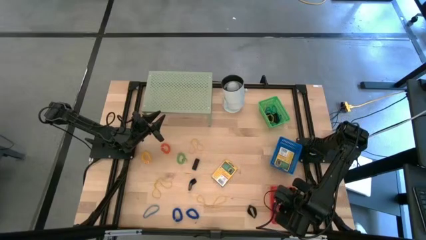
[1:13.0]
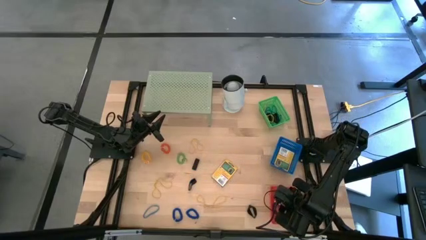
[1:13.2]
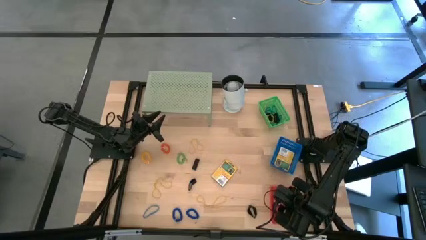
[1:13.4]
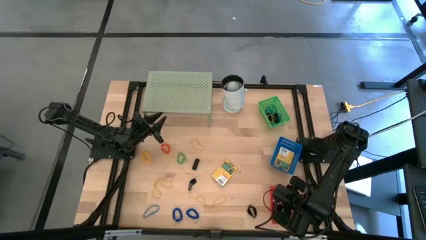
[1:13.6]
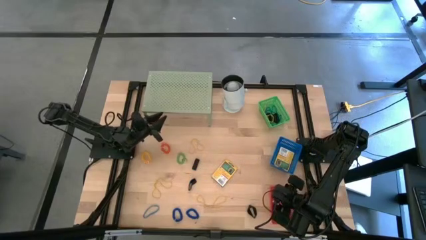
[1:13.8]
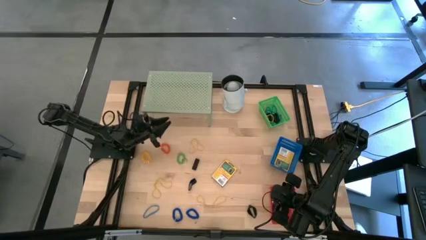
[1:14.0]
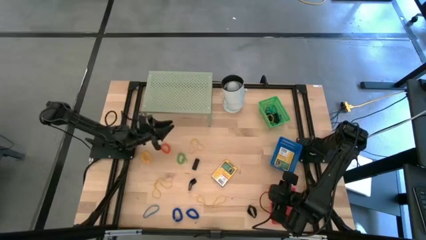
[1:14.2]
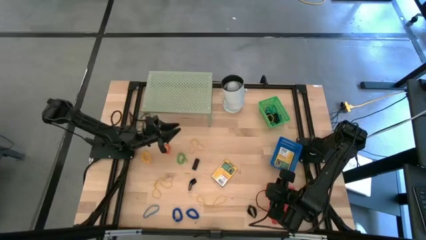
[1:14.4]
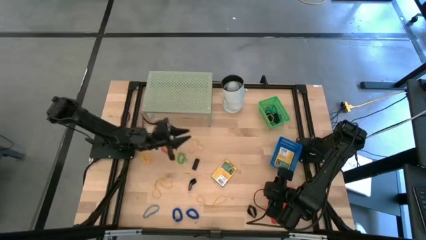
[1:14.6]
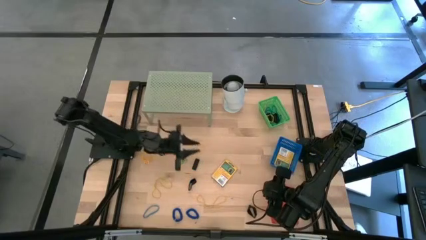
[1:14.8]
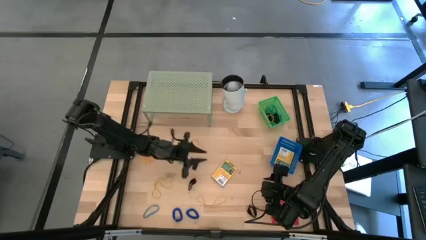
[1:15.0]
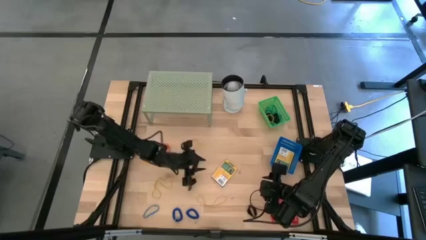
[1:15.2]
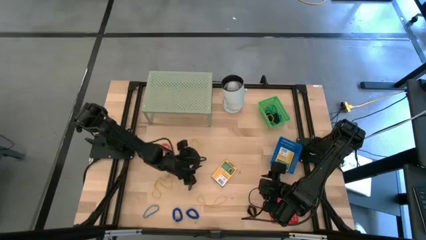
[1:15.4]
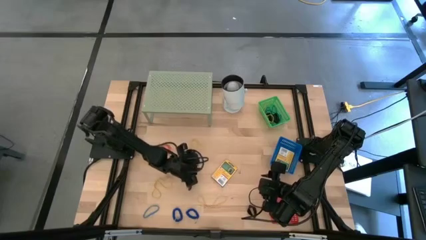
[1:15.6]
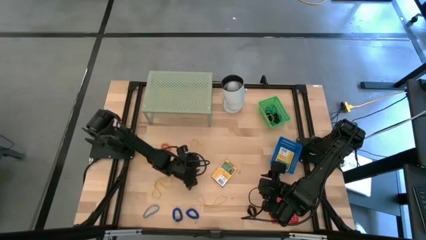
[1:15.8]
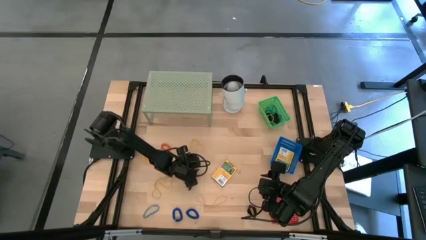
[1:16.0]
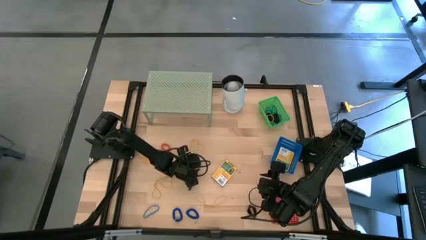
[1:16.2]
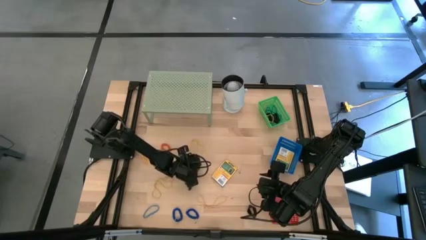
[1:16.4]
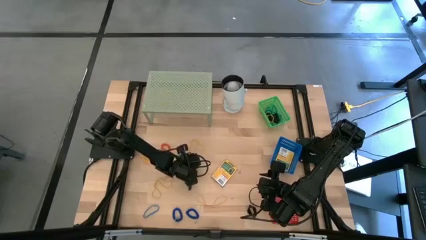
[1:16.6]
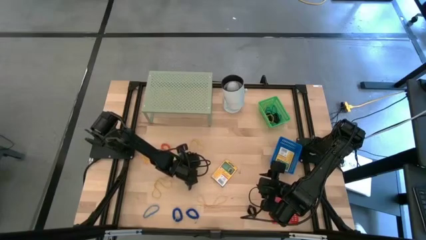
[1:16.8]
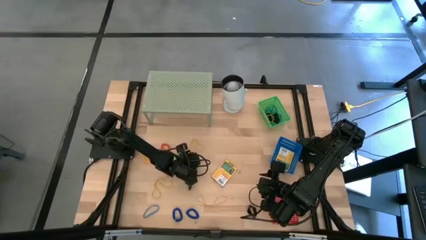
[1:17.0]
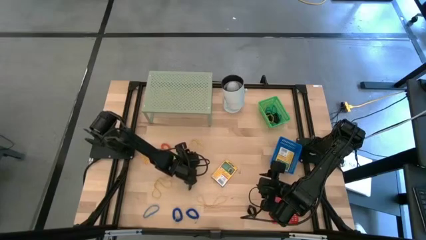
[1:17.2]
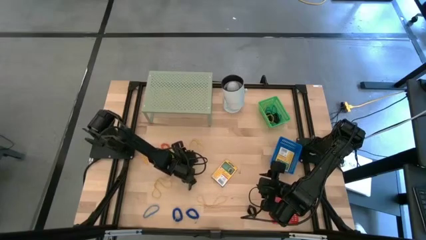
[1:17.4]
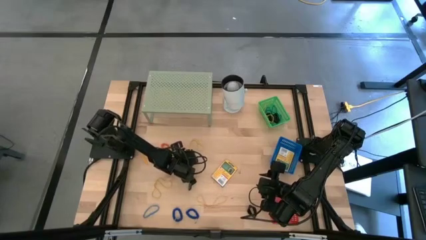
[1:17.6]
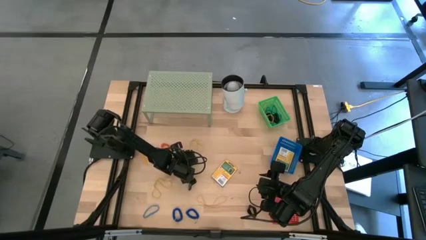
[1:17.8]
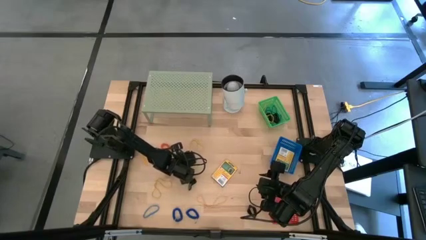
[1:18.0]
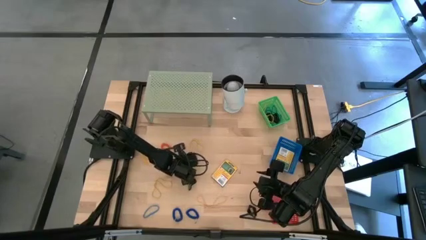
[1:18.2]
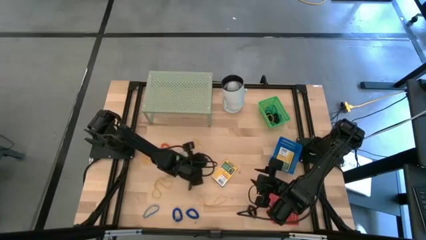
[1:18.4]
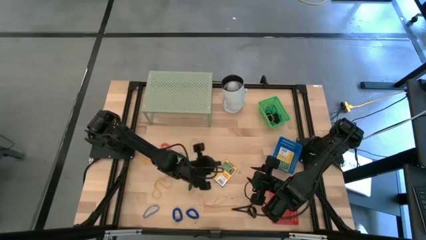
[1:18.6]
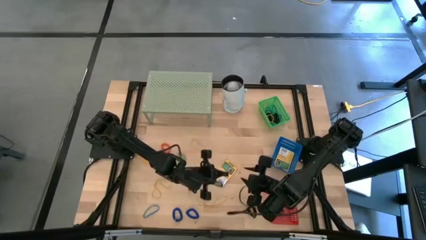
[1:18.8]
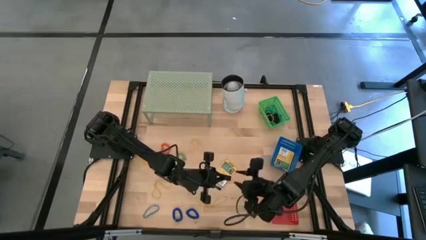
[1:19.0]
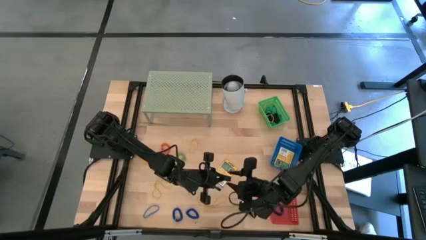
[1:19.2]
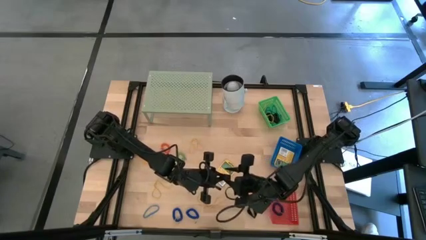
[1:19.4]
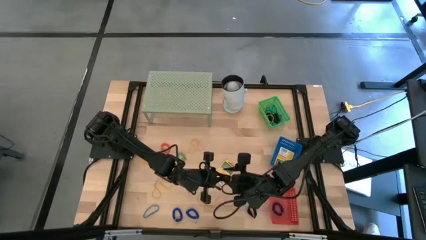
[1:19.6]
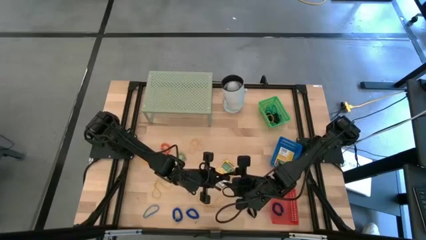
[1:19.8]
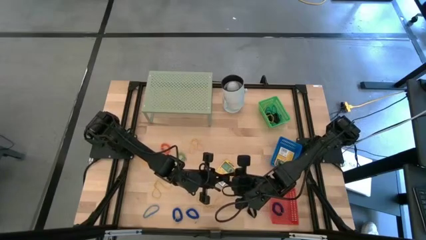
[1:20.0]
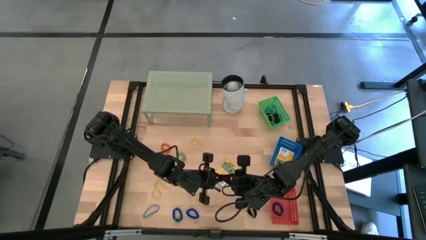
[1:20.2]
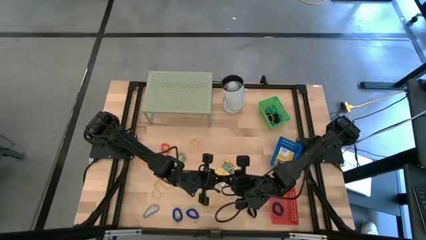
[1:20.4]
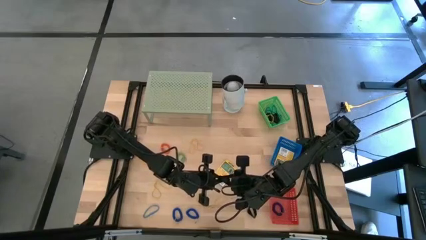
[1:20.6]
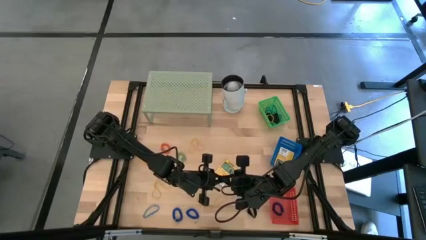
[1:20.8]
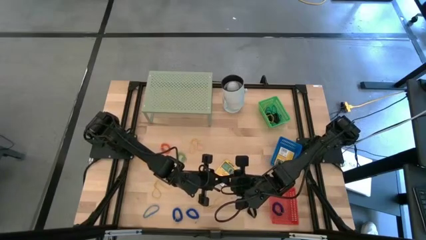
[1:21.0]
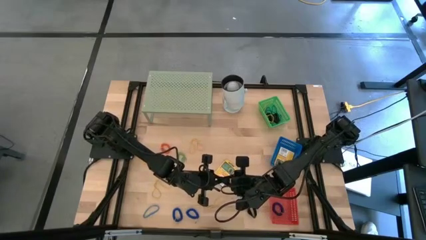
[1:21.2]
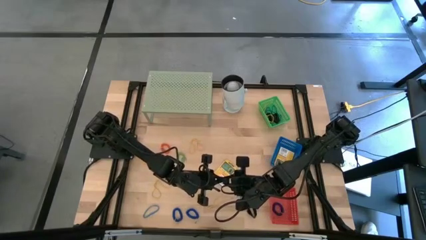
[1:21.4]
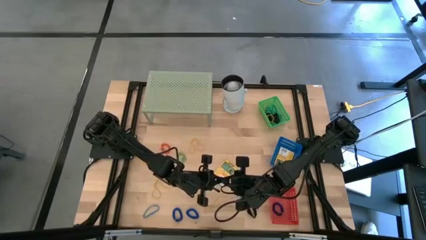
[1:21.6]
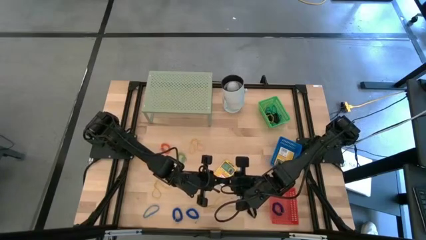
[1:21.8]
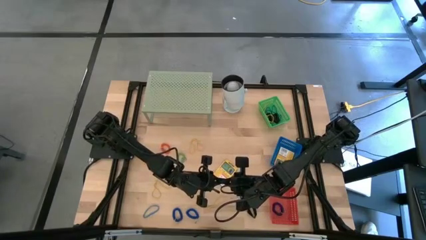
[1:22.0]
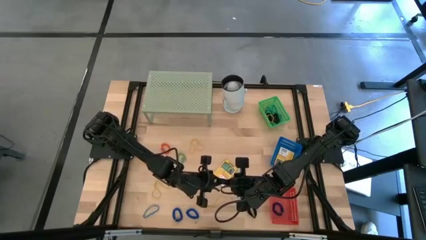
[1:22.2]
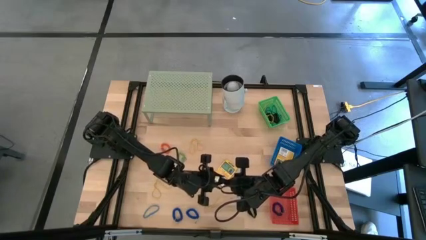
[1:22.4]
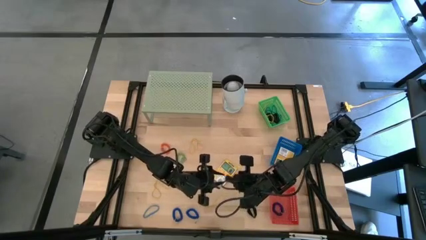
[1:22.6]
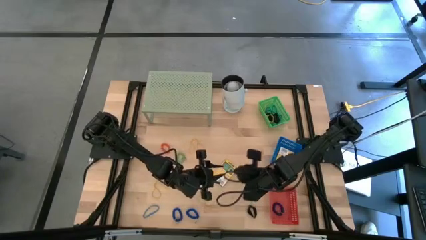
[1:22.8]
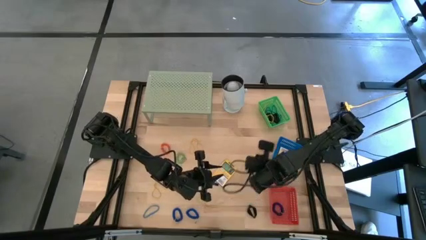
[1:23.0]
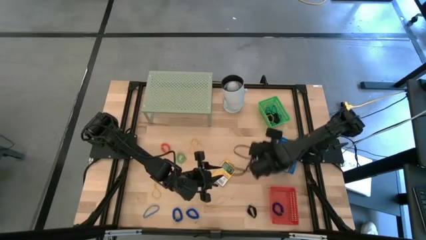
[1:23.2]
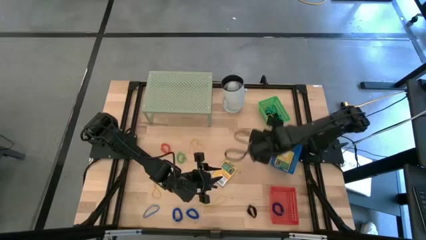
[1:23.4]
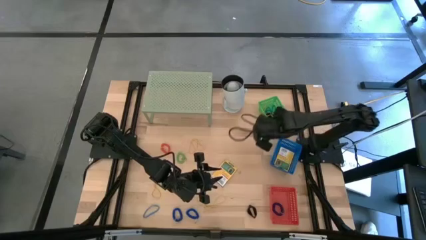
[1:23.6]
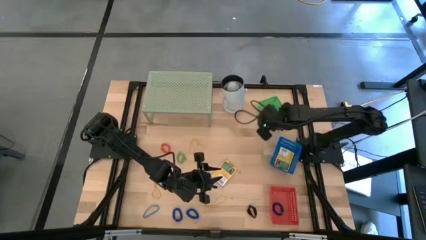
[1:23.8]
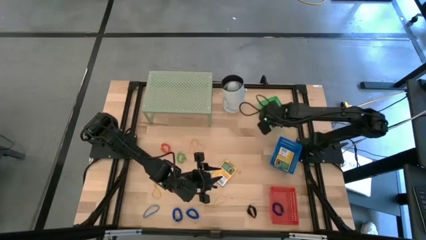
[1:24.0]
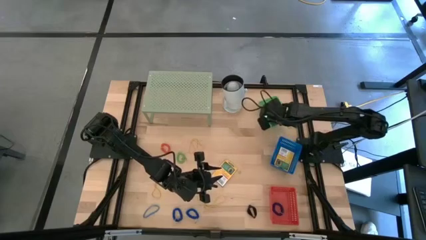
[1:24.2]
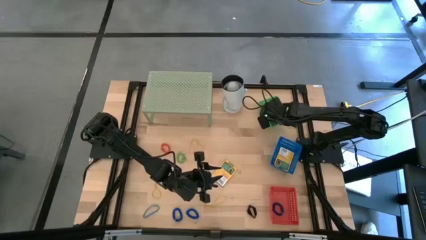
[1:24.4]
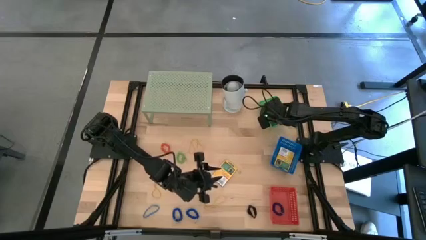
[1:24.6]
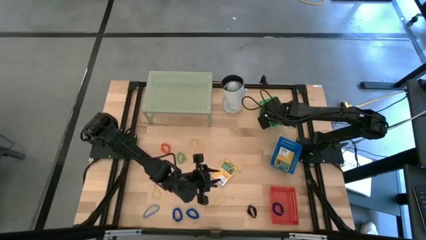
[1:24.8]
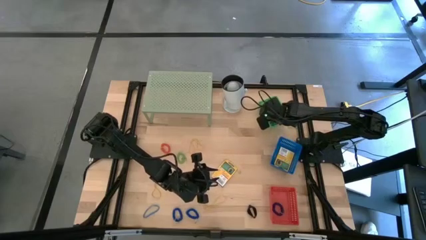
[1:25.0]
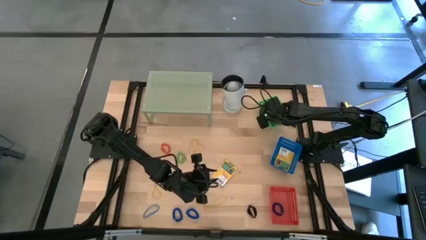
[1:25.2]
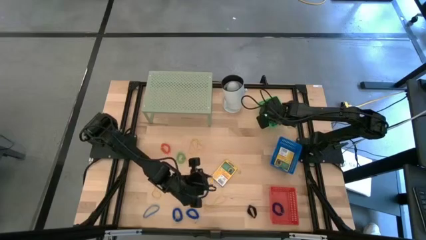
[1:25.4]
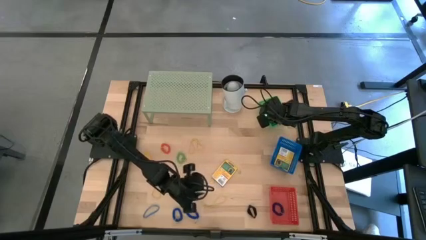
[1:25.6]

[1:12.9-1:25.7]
Task: Pick & Place Office Desk Supplies
Put the black rubber band into the green bin

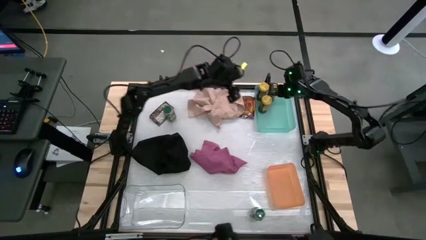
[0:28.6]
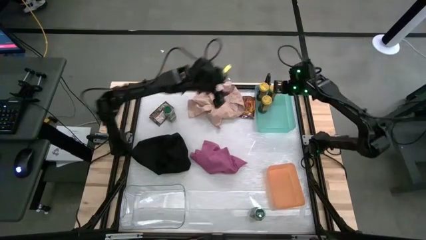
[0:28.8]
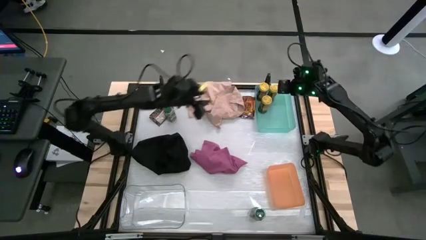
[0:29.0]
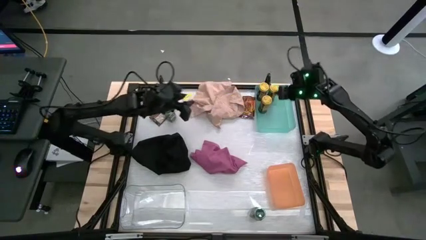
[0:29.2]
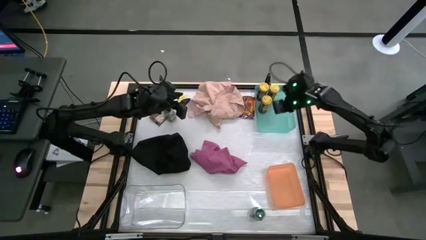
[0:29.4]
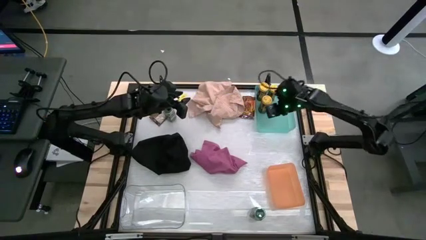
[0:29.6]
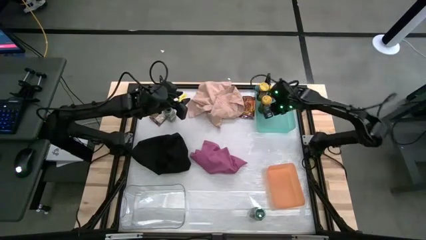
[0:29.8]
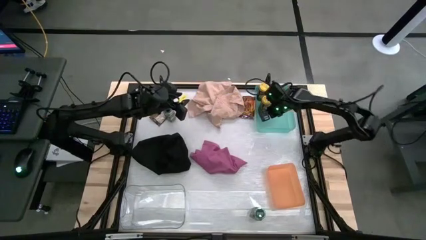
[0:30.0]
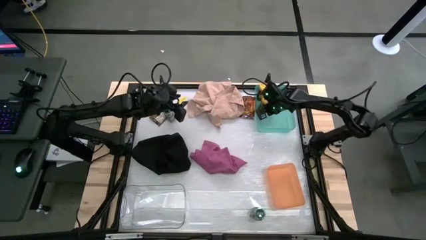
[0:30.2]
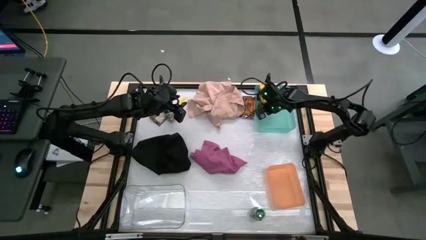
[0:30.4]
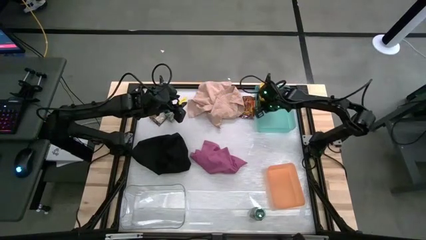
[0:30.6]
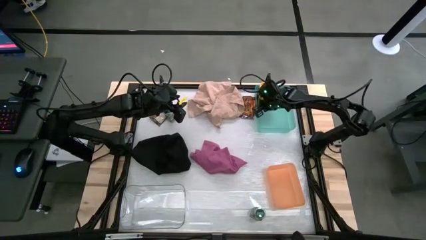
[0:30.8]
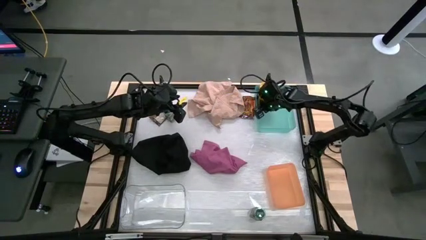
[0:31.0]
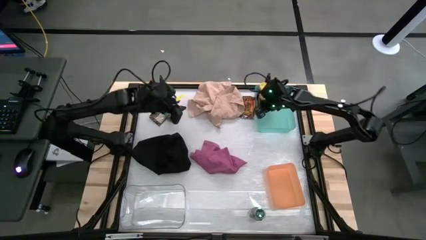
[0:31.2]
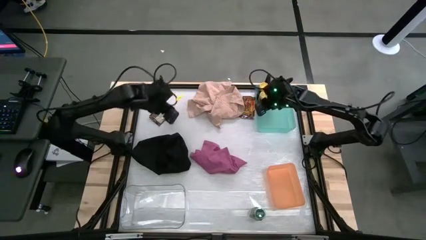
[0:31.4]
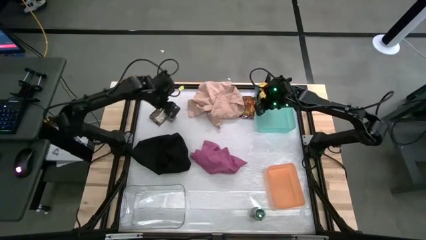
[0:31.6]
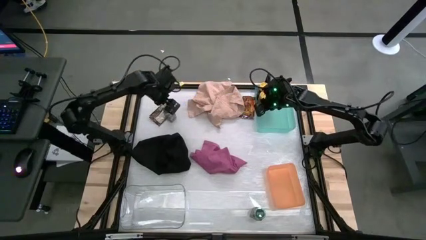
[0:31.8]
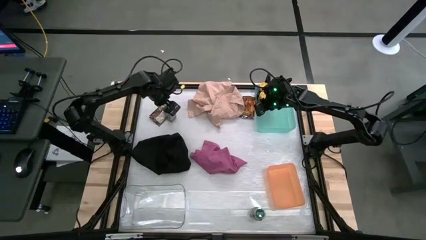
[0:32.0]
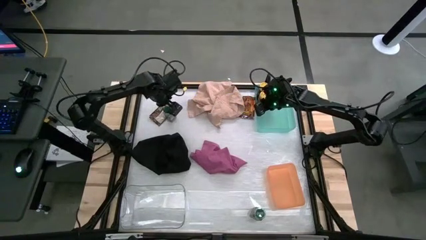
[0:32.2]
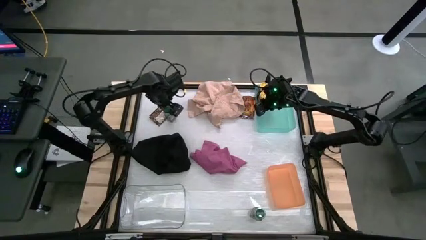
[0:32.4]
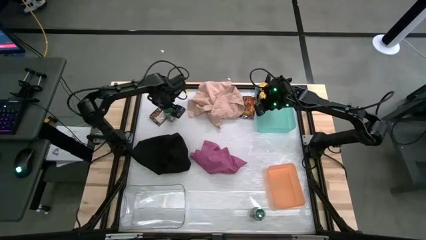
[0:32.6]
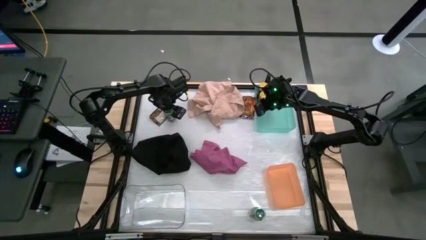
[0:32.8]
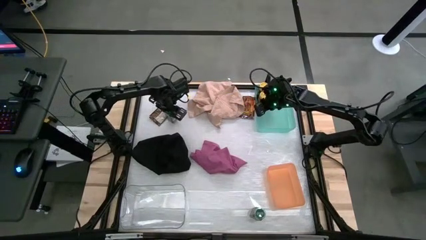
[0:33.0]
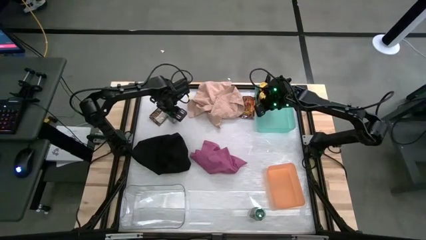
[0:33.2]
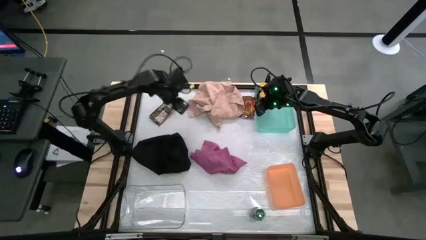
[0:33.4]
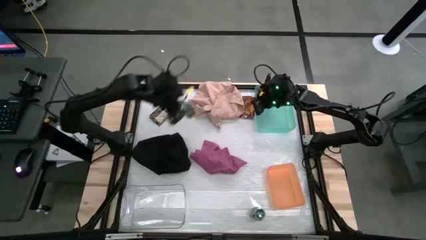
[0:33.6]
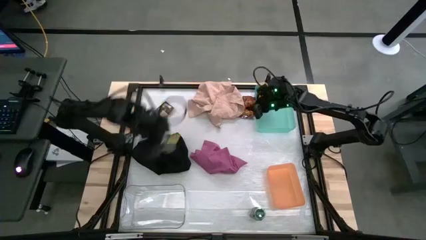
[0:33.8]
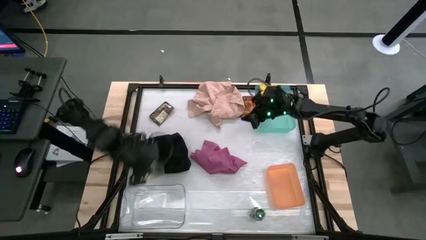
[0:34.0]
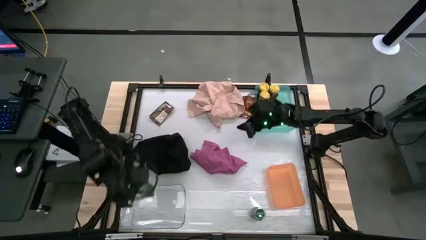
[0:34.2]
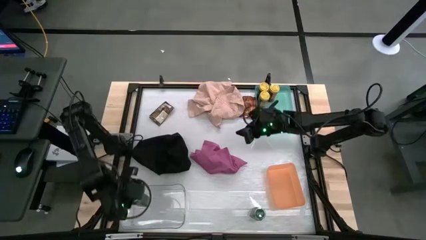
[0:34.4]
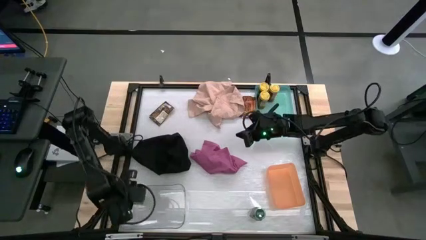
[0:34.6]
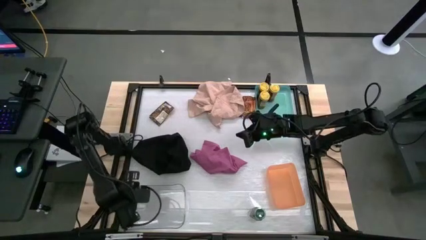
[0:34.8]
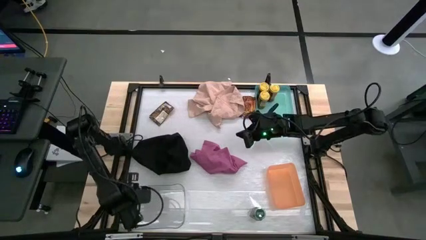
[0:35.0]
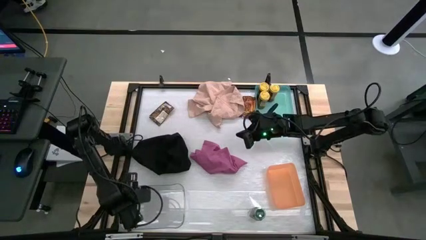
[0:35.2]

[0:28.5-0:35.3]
Task: Sort spices by type
Put the top green seasoning bottle into the transparent bin
